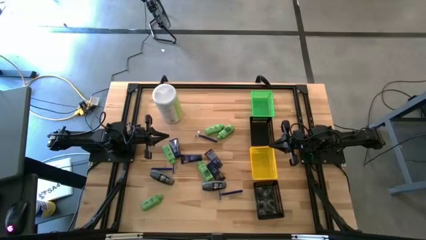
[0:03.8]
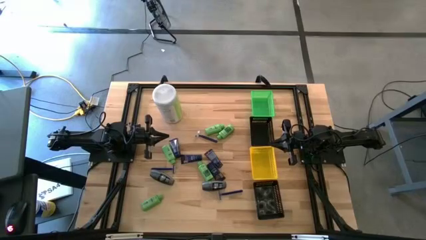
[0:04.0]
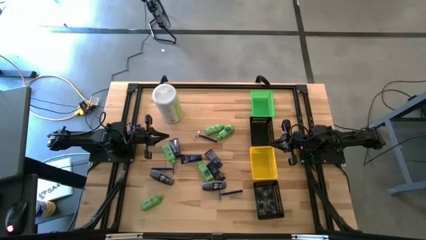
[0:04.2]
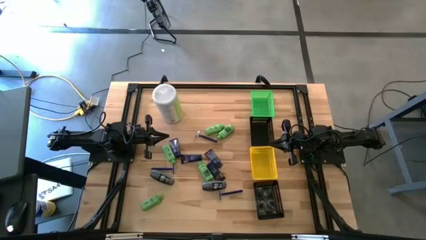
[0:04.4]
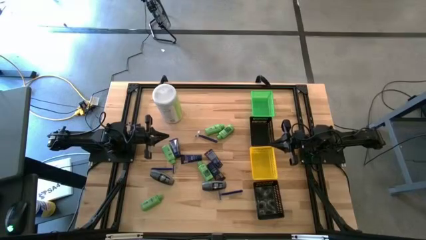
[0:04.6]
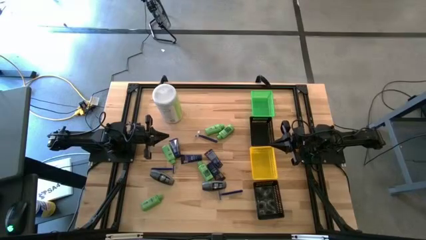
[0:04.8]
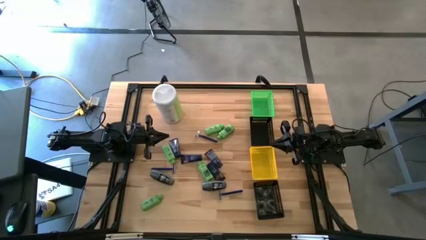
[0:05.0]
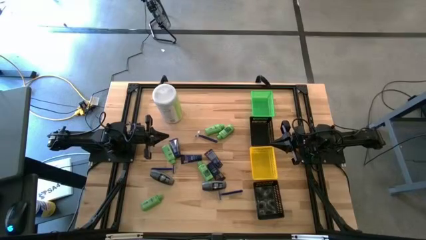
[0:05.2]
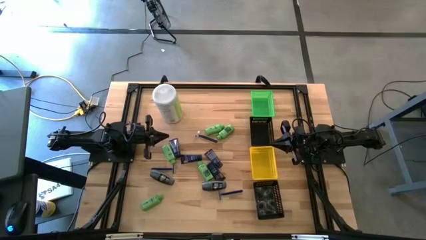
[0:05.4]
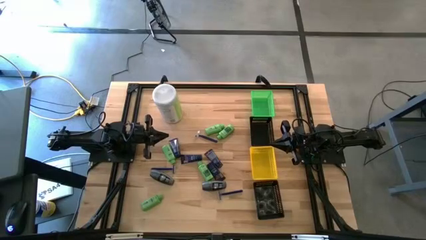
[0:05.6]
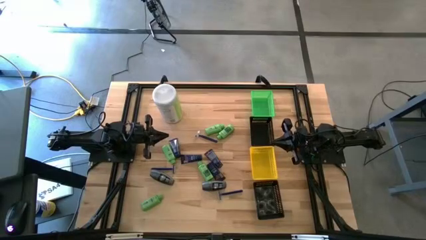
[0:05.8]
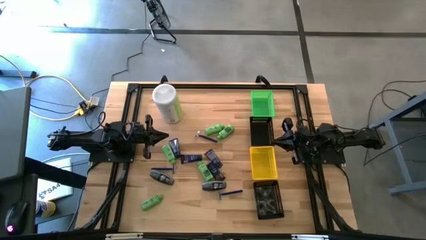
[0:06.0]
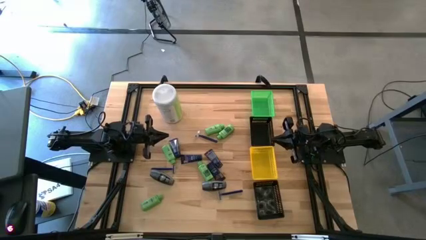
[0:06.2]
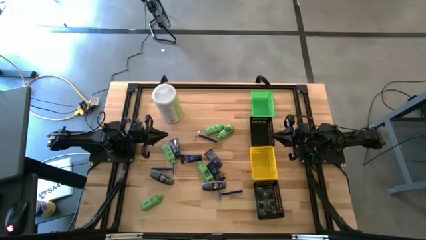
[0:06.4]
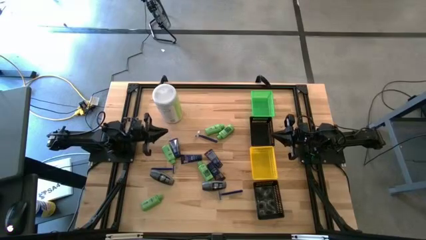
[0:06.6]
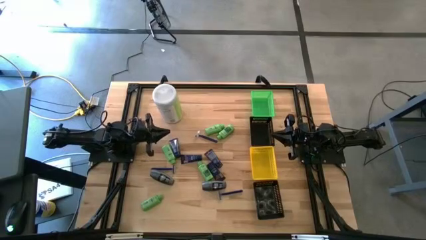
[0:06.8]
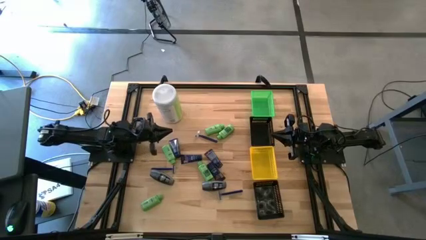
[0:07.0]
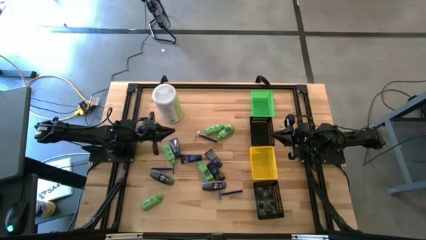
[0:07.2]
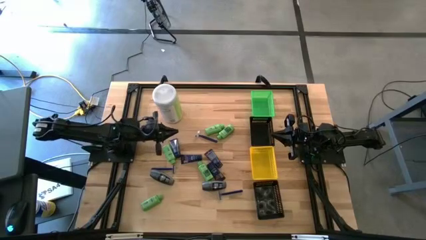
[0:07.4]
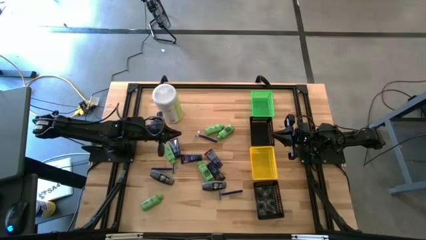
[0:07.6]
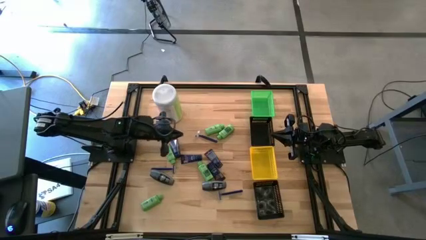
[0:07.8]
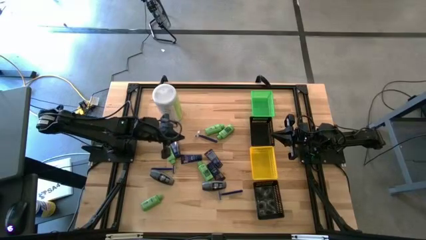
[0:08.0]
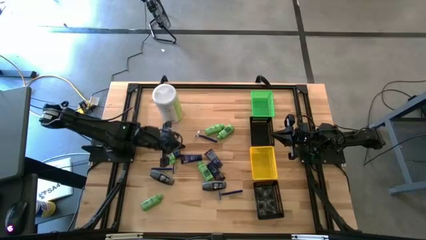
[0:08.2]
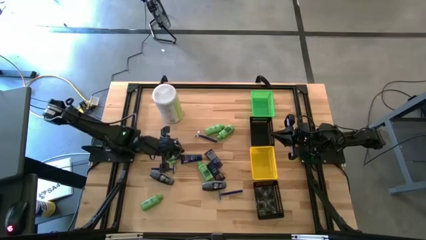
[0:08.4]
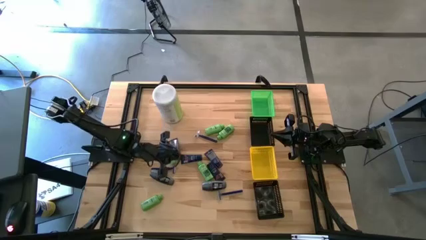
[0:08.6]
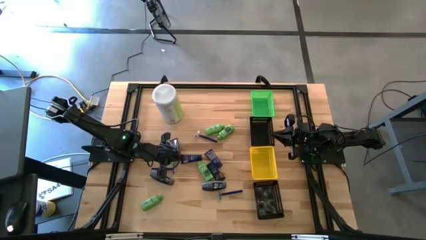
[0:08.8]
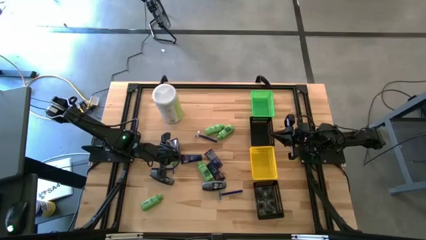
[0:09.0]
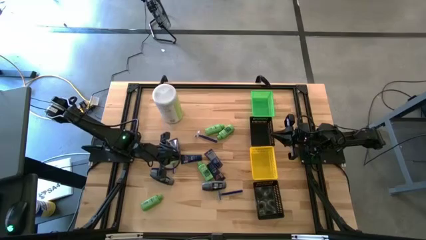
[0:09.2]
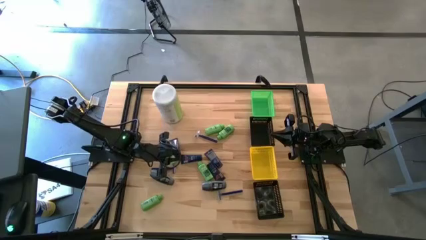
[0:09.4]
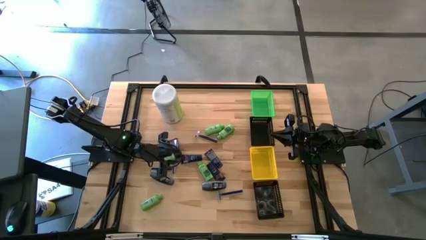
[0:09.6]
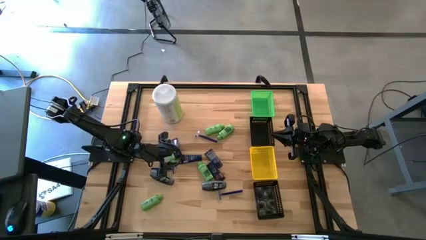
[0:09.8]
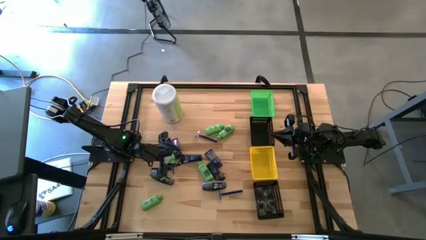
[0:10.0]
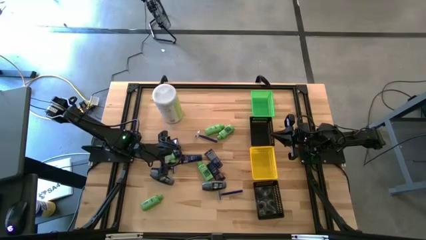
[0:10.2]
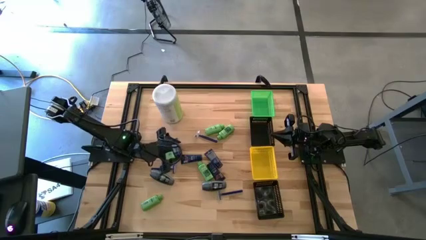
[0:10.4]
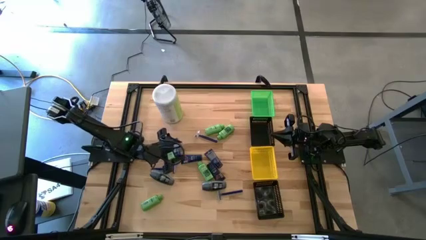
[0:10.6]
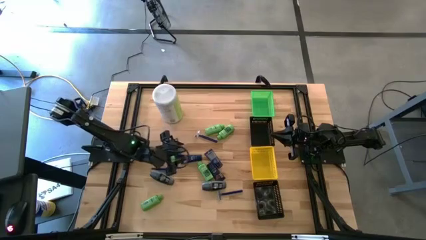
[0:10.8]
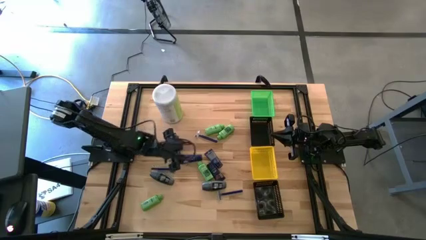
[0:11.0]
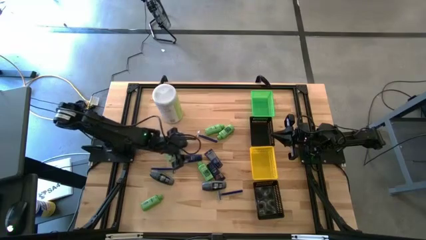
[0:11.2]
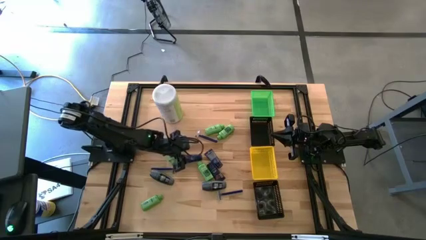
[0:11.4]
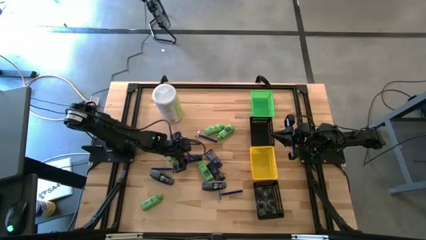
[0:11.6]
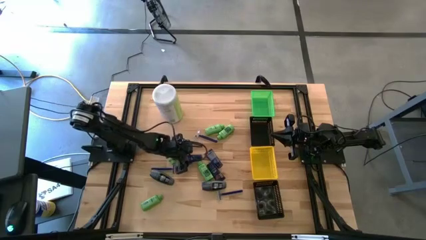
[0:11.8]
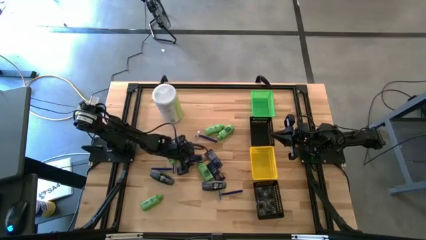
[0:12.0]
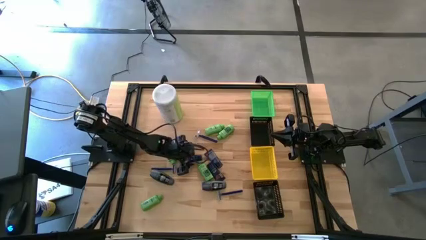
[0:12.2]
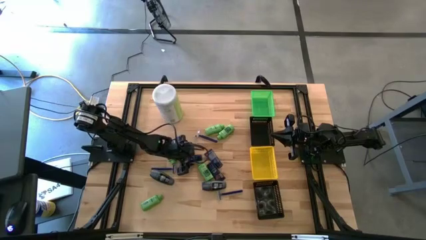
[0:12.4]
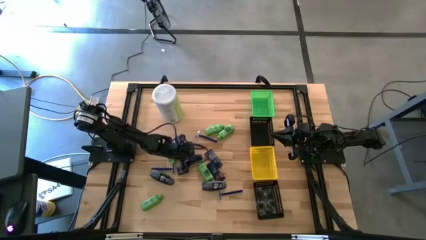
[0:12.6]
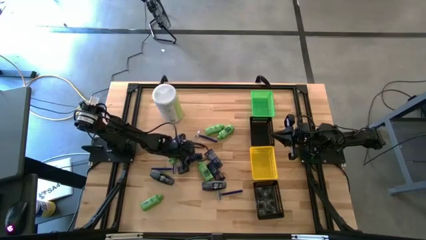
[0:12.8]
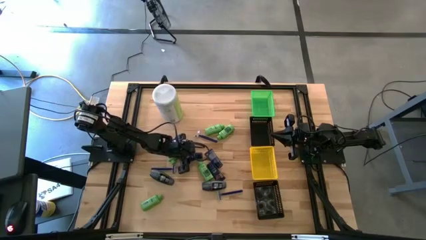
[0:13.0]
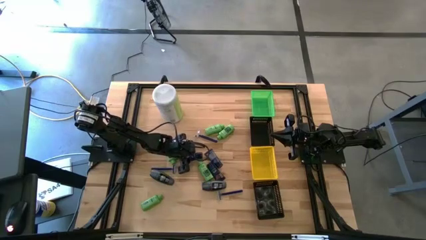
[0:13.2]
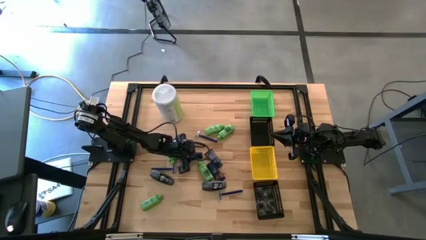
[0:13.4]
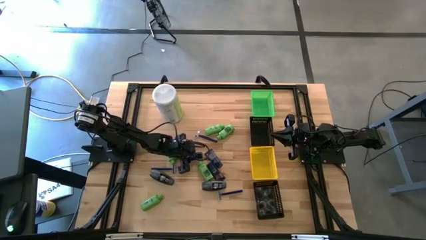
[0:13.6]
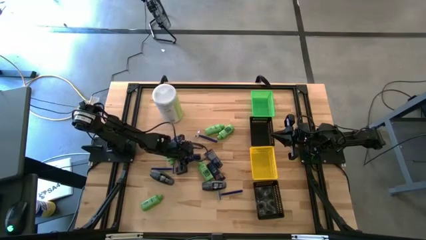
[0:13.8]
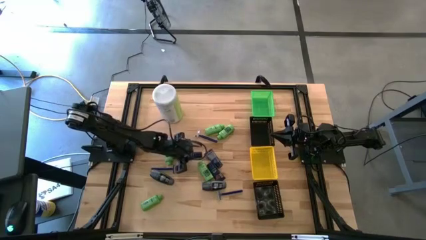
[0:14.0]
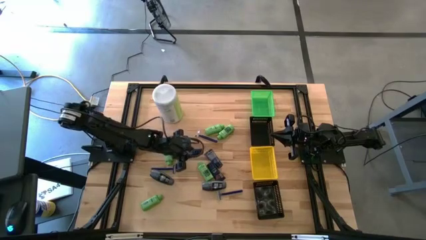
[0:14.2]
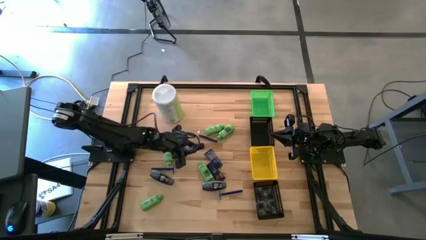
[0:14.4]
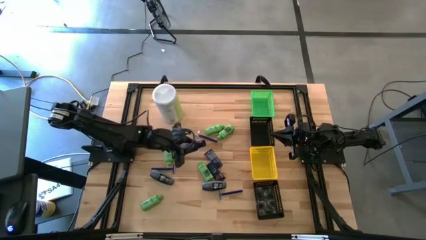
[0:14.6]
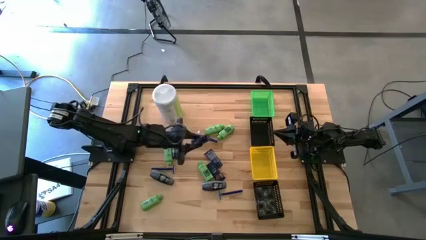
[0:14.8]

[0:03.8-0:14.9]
Task: Pick & Place Travel size toiletries
Put the blue shave cream into the green basket
